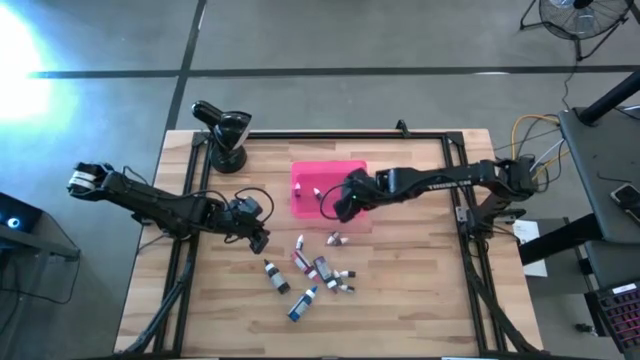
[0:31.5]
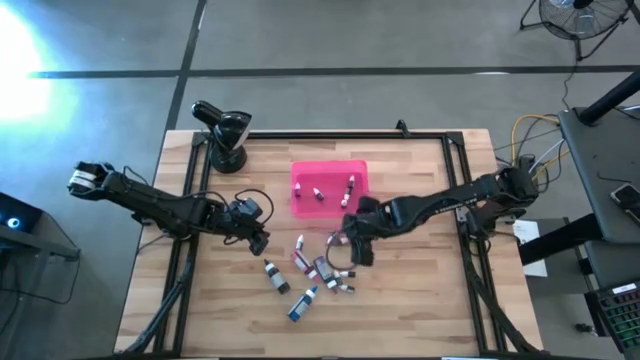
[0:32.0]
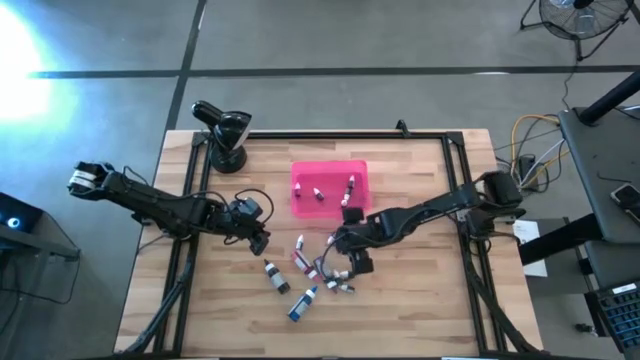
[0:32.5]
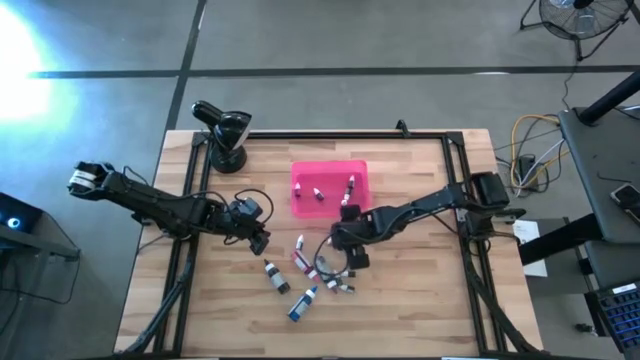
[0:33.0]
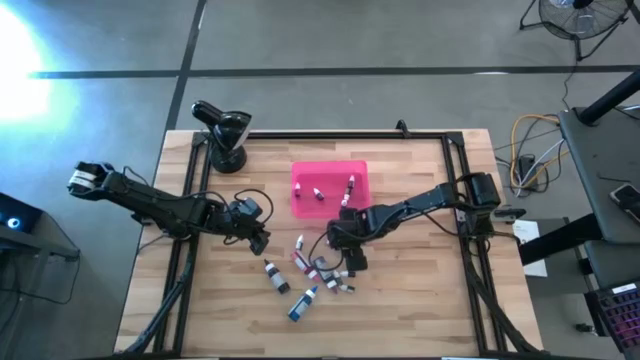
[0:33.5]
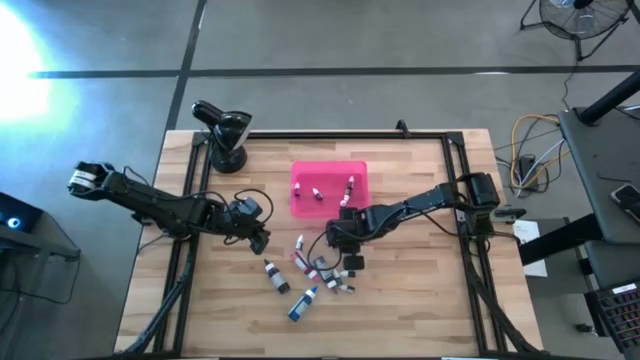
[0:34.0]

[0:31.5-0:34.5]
Task: Pick & Place food coloring
Put the orange food coloring bottle into the pink bin

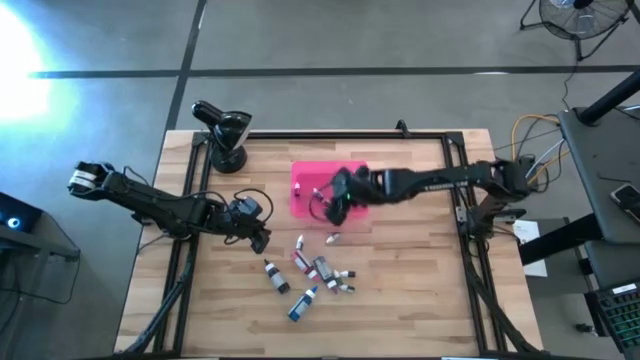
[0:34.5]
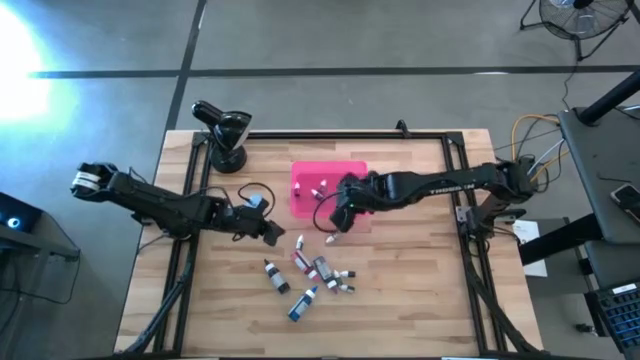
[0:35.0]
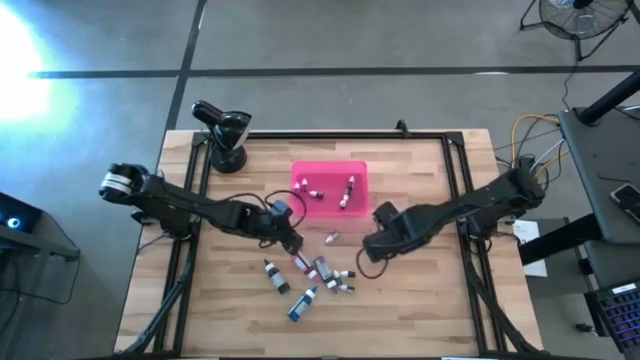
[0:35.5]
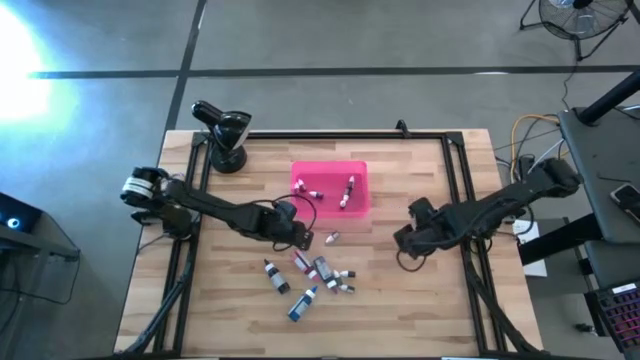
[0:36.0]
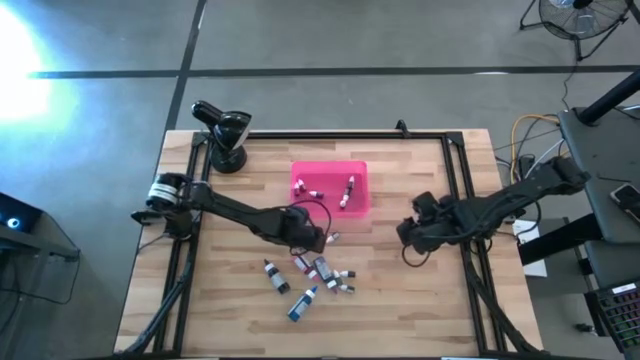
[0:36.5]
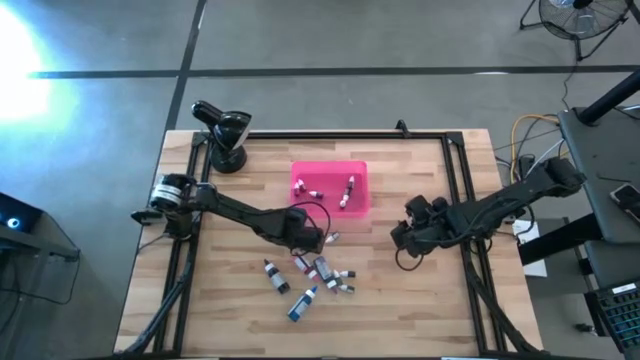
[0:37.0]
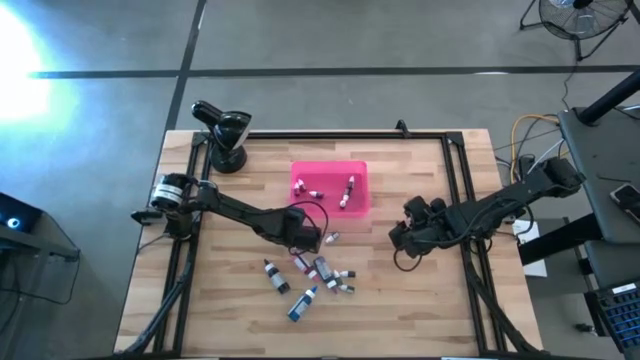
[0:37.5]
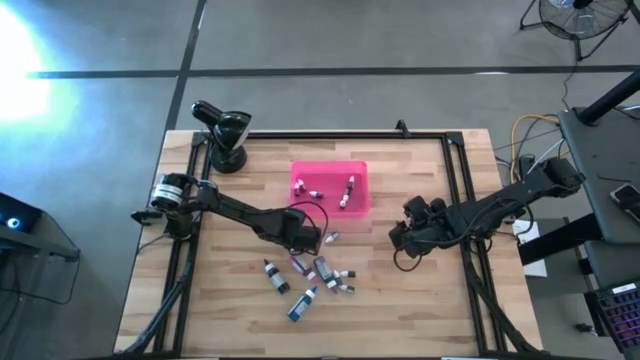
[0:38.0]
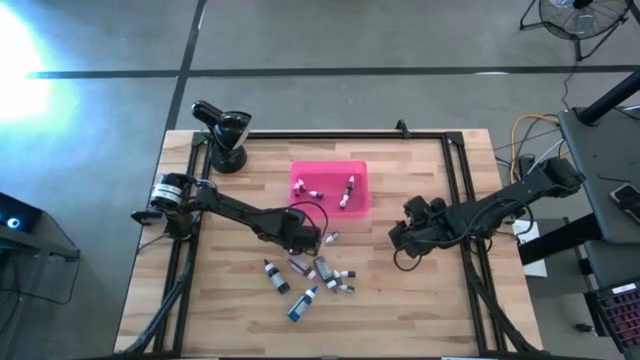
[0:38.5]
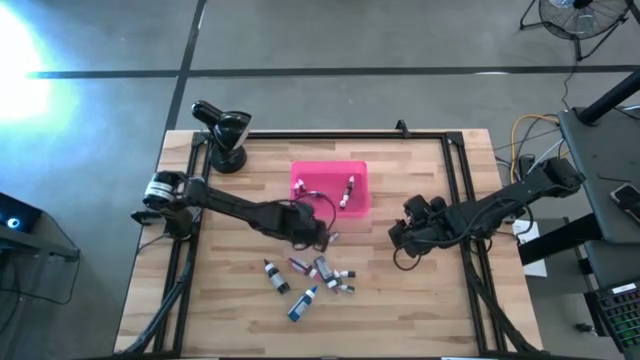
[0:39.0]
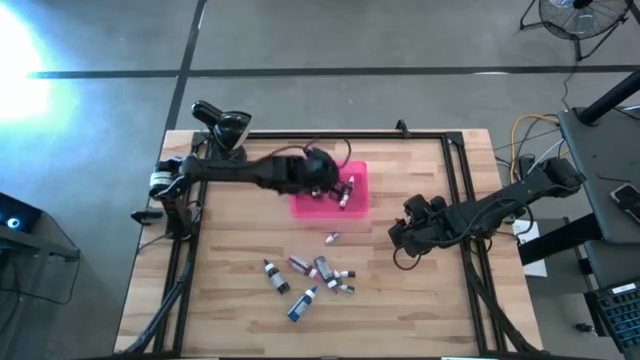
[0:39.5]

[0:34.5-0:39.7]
Put the purple food coloring bottle into the pink bin

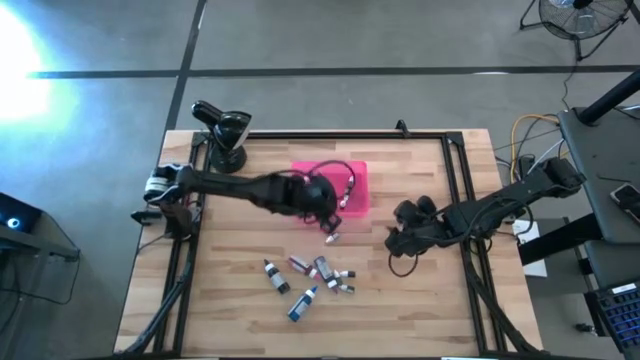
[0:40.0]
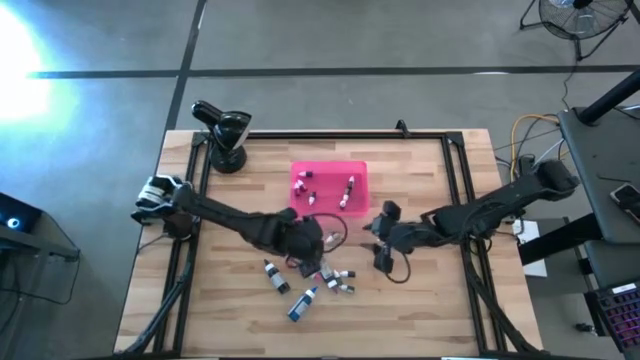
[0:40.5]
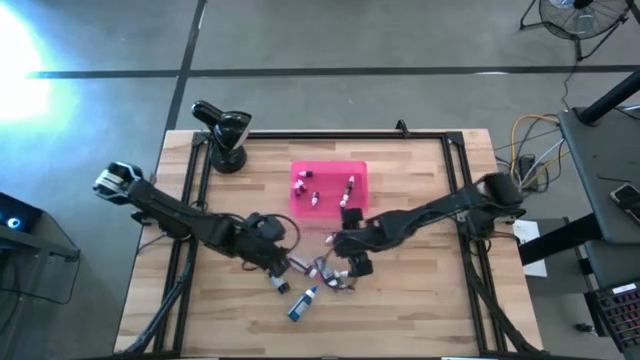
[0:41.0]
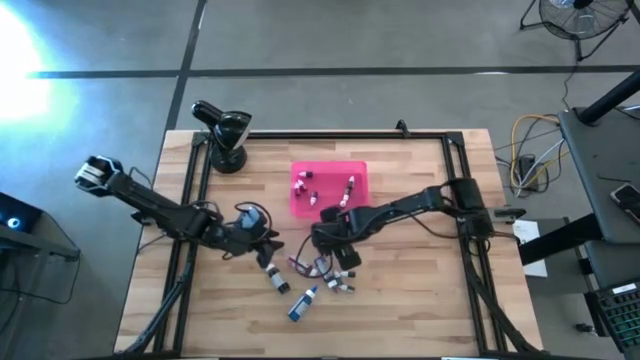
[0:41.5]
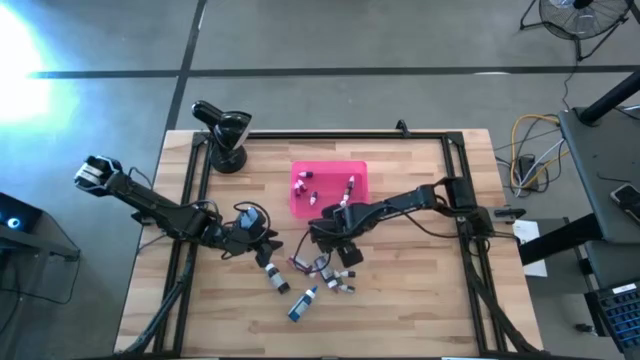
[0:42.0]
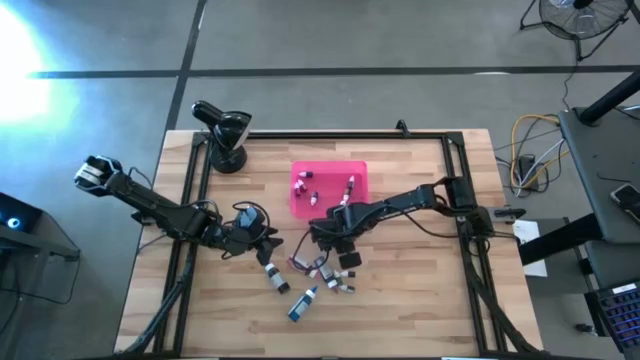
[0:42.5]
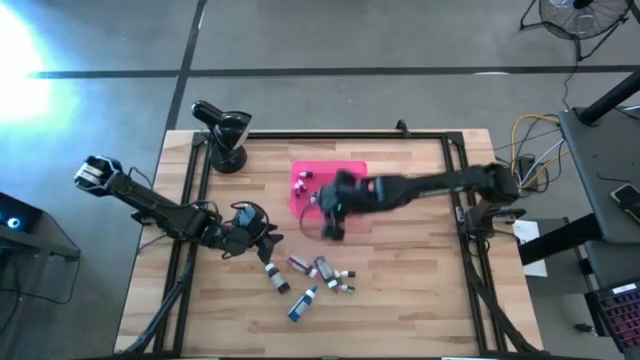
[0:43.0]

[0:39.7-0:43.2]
Put the green food coloring bottle into the pink bin

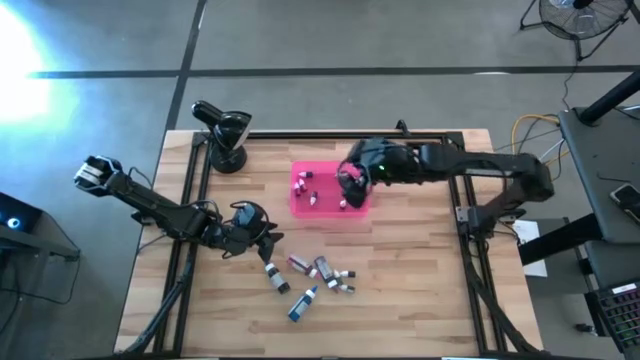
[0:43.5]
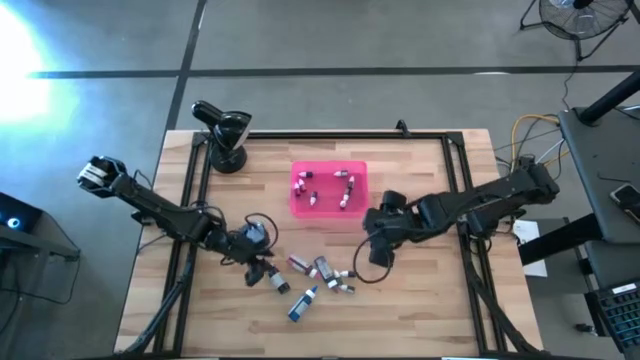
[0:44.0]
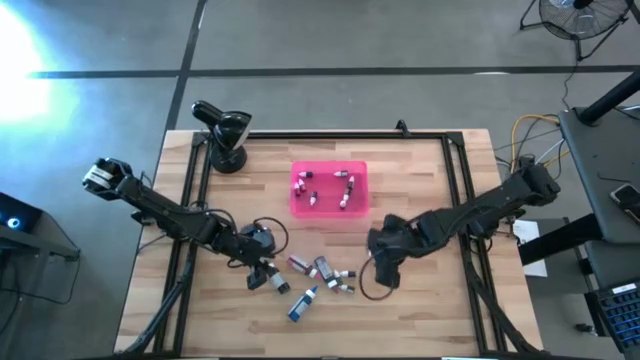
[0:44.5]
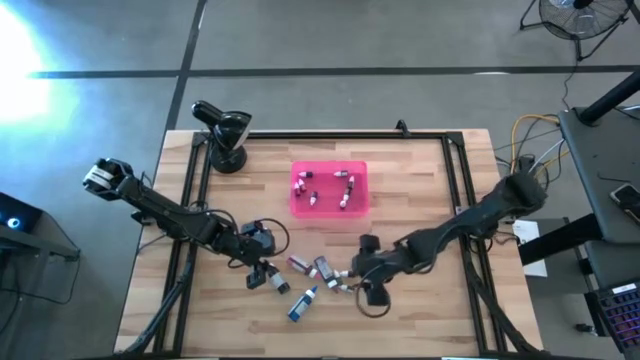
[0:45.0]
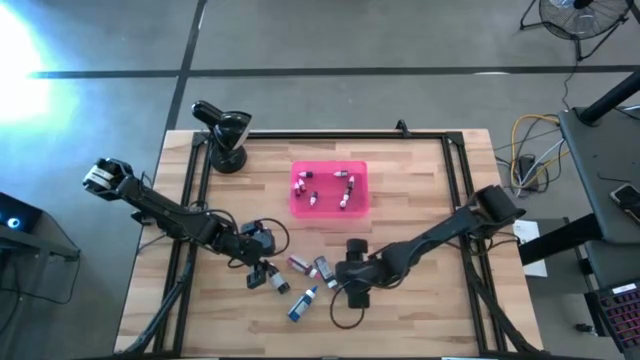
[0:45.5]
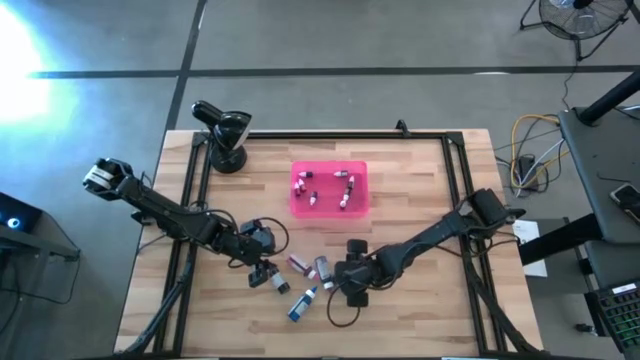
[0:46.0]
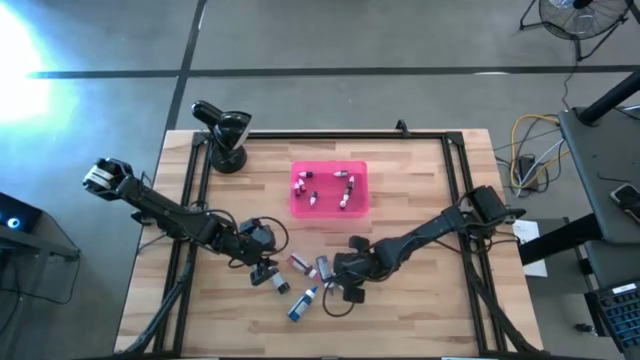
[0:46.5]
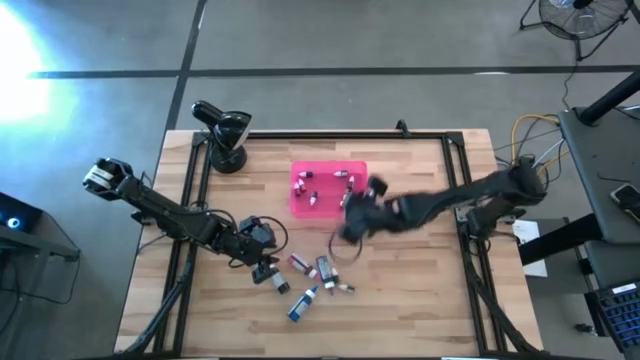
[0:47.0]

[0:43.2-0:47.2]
Put the green food coloring bottle into the pink bin

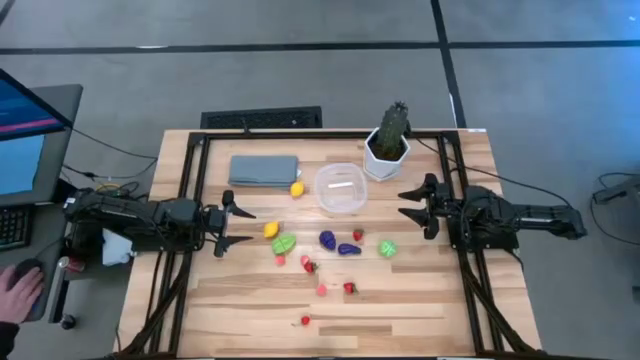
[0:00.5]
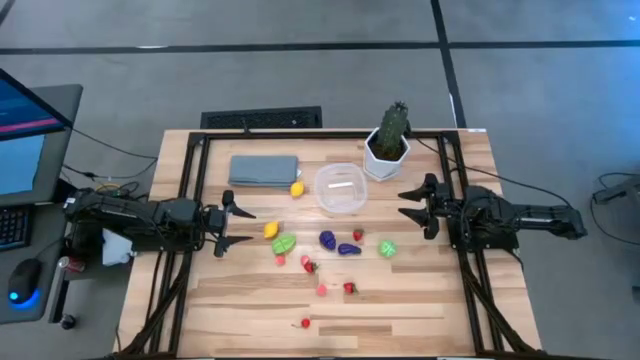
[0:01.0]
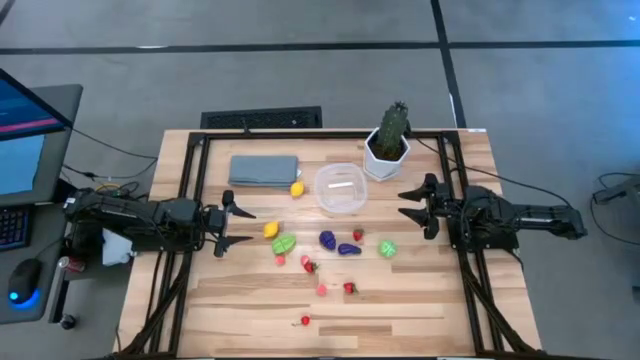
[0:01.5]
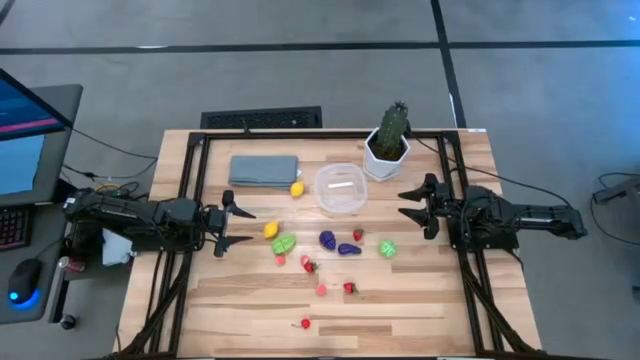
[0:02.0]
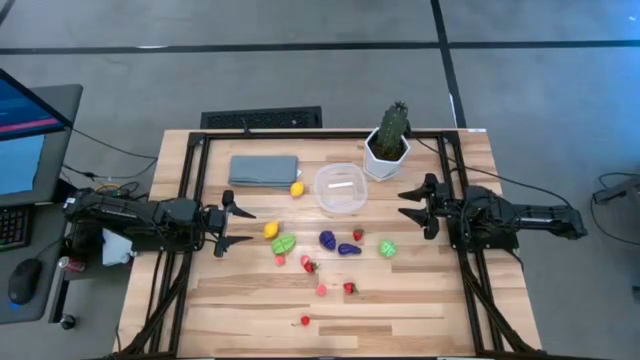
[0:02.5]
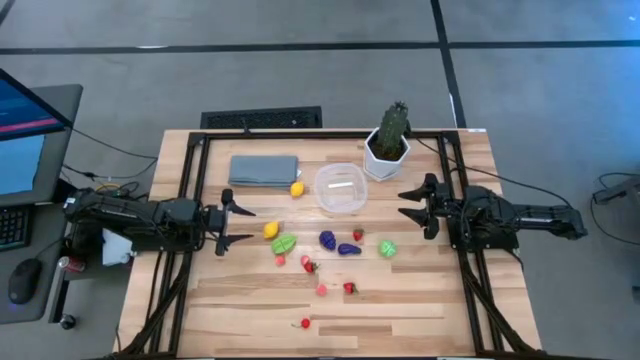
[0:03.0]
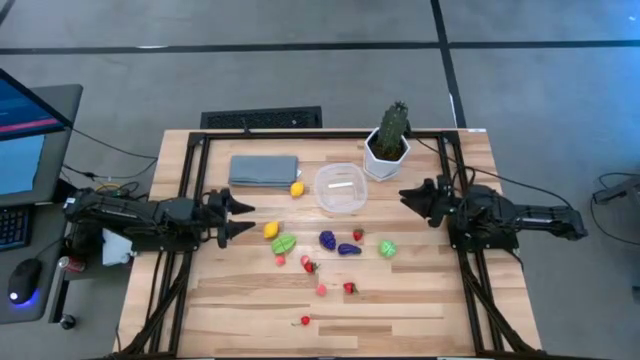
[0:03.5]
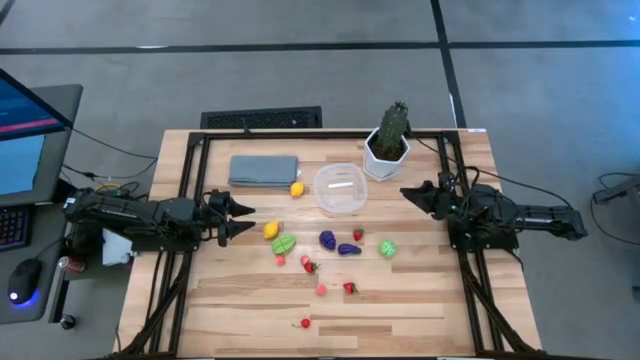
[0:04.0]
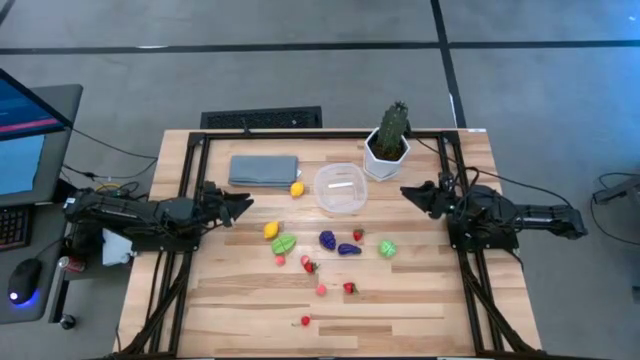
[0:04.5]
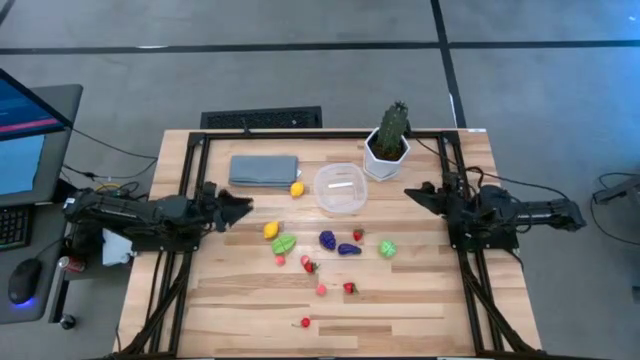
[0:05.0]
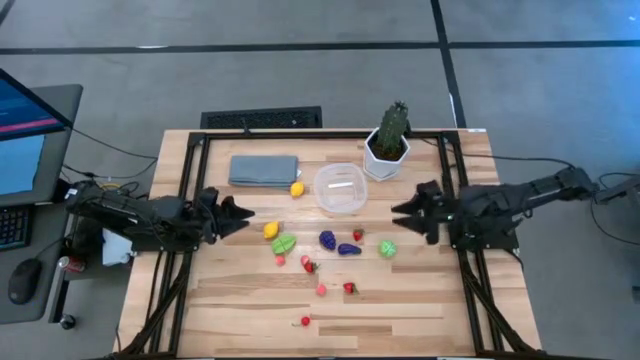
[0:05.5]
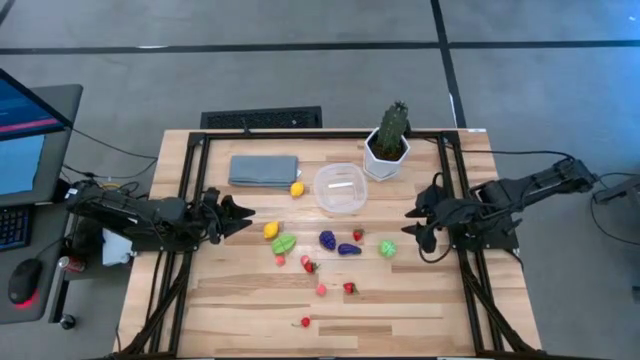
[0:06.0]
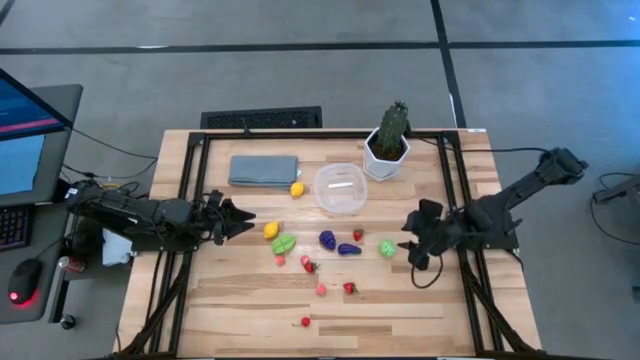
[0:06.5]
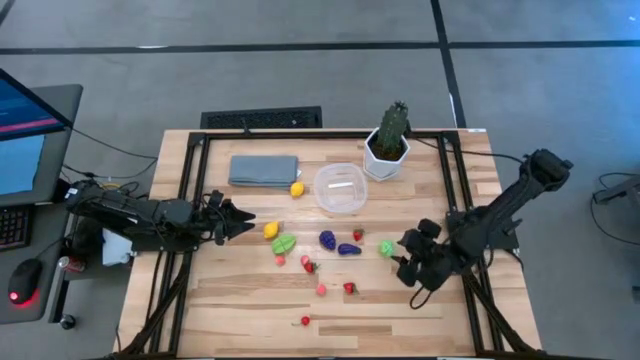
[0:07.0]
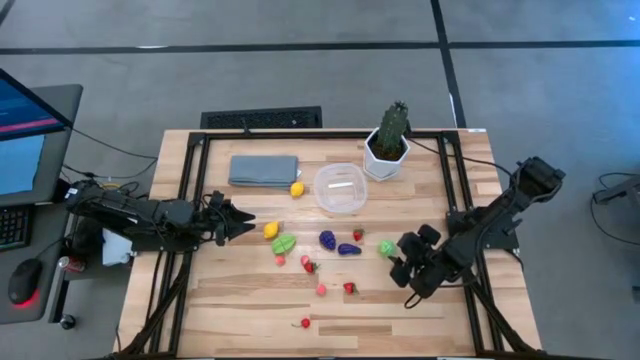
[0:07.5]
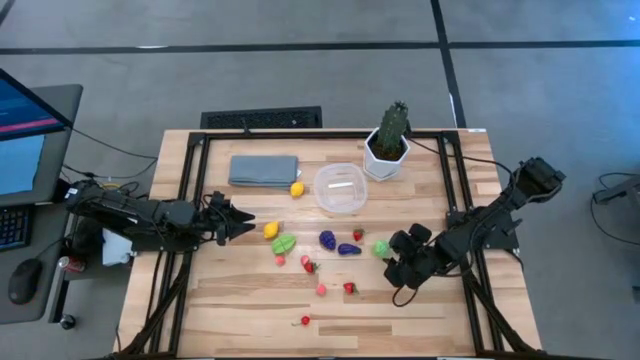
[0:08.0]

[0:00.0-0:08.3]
Task: Pick and placing Produce into tupperware
Put the cabbage into the transparent bin
